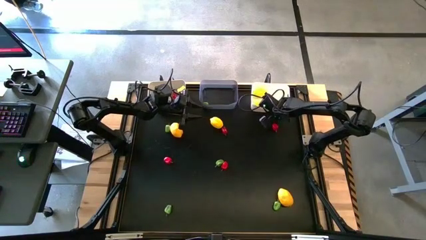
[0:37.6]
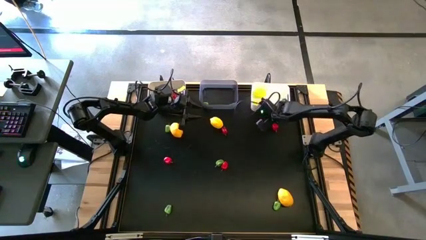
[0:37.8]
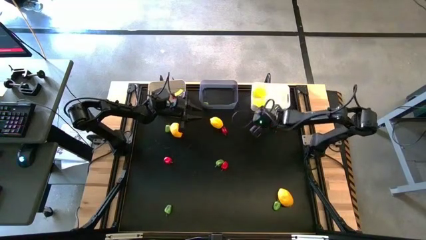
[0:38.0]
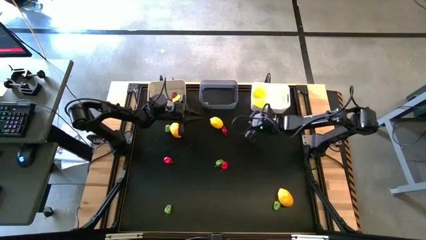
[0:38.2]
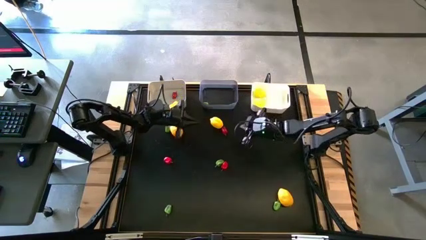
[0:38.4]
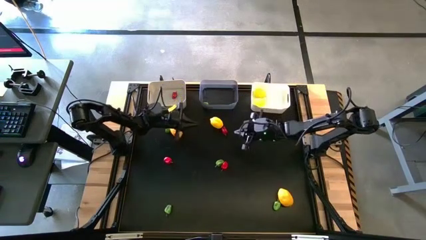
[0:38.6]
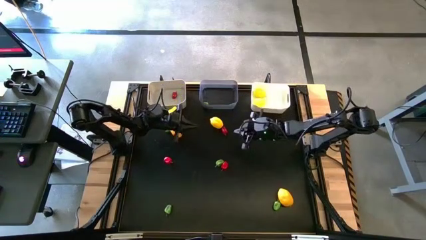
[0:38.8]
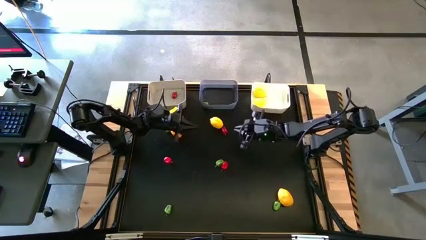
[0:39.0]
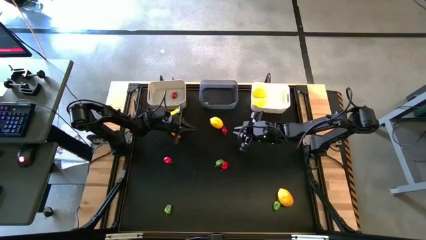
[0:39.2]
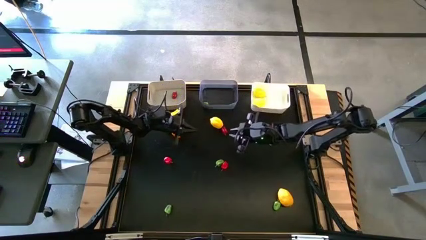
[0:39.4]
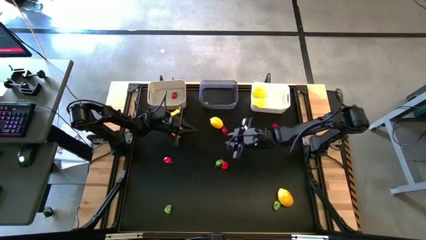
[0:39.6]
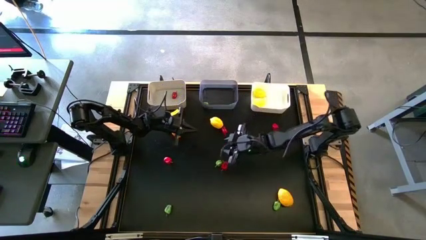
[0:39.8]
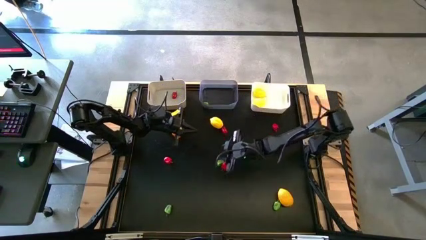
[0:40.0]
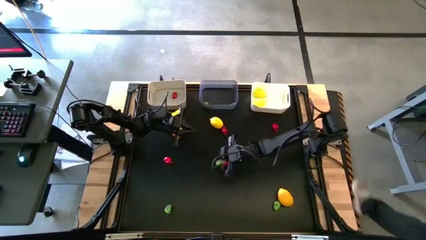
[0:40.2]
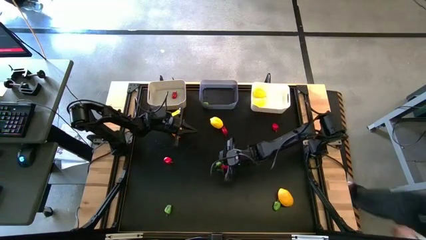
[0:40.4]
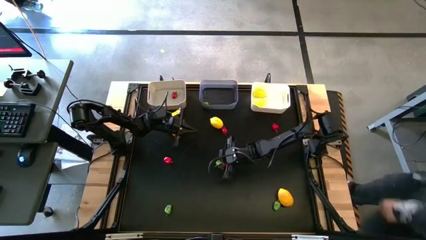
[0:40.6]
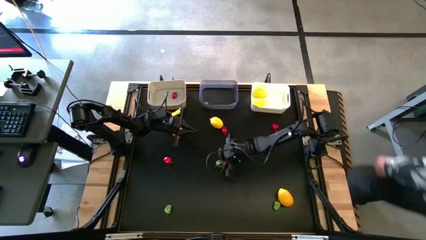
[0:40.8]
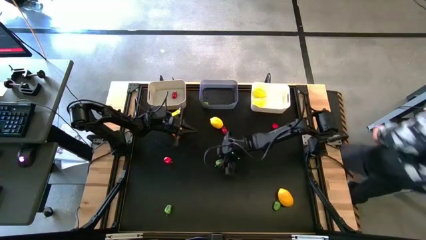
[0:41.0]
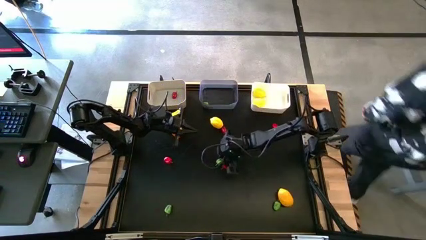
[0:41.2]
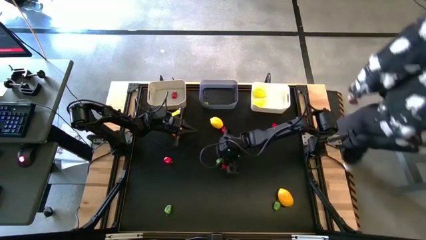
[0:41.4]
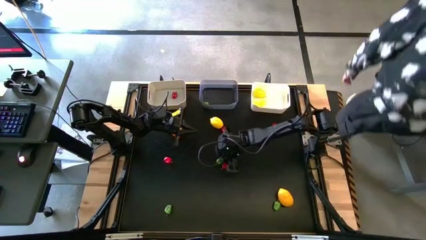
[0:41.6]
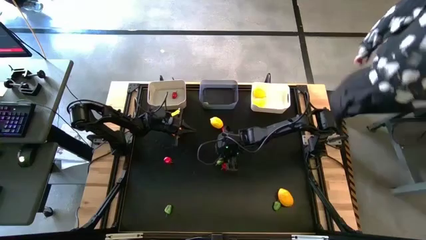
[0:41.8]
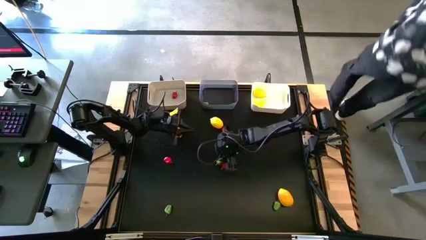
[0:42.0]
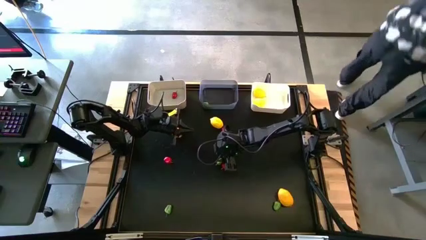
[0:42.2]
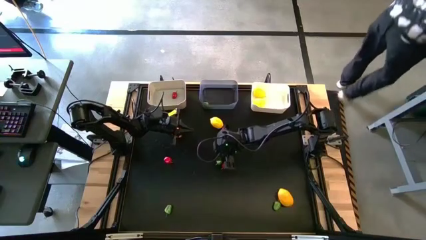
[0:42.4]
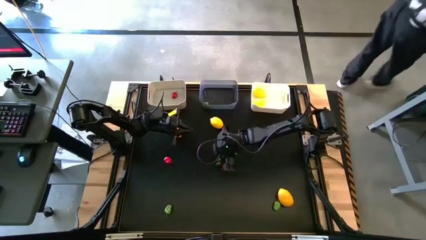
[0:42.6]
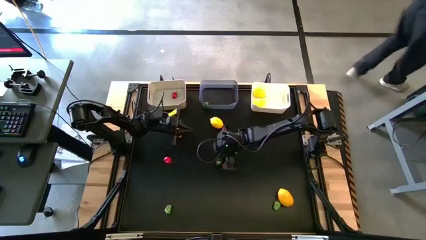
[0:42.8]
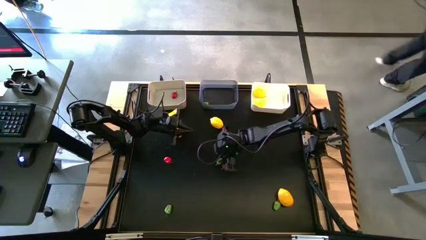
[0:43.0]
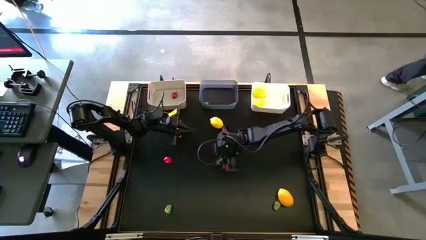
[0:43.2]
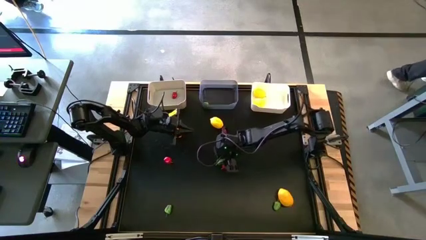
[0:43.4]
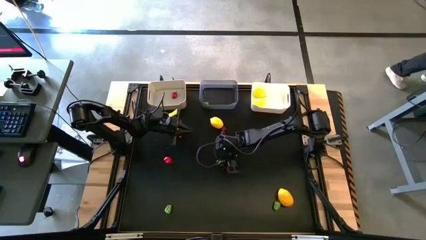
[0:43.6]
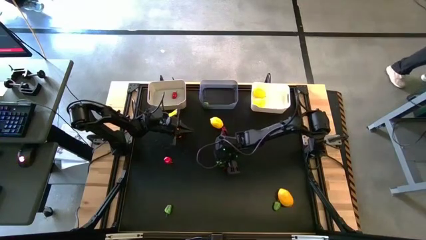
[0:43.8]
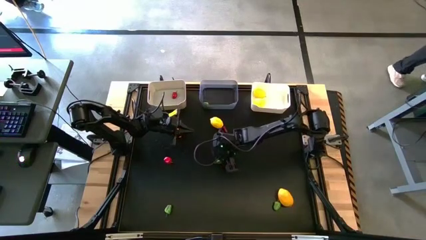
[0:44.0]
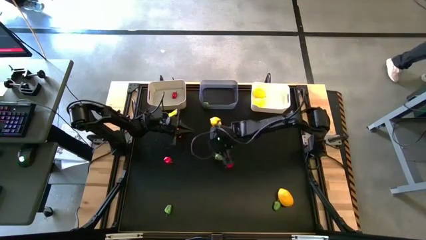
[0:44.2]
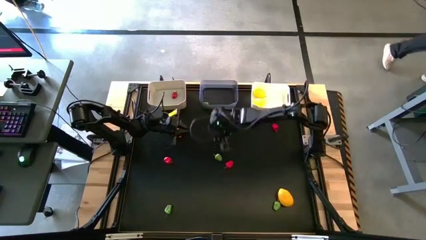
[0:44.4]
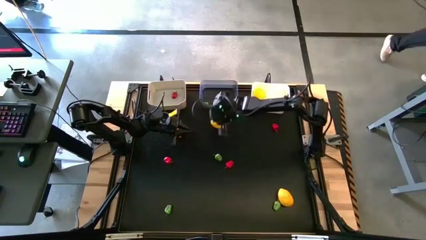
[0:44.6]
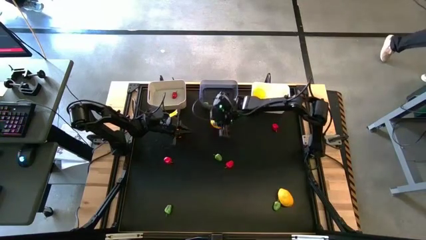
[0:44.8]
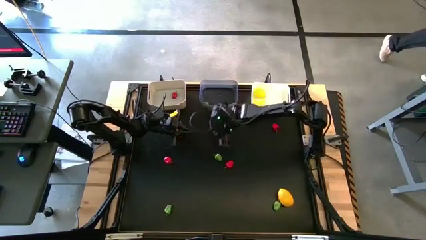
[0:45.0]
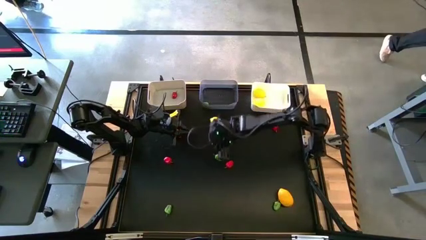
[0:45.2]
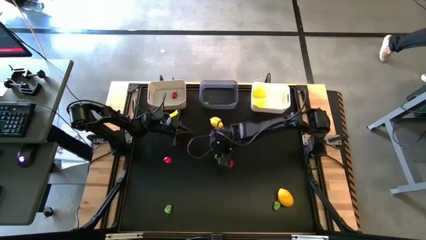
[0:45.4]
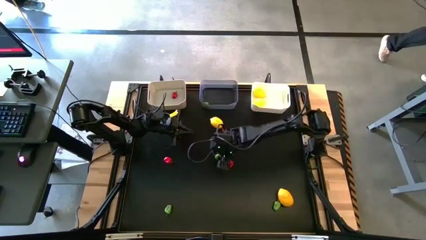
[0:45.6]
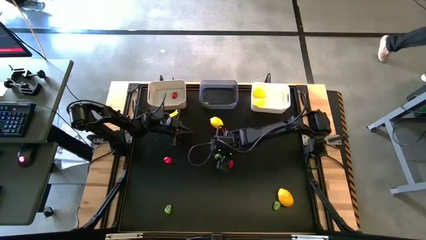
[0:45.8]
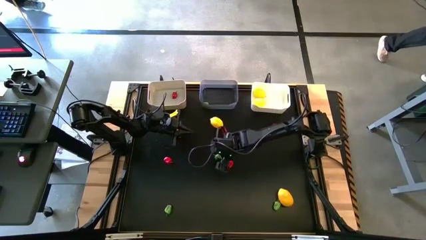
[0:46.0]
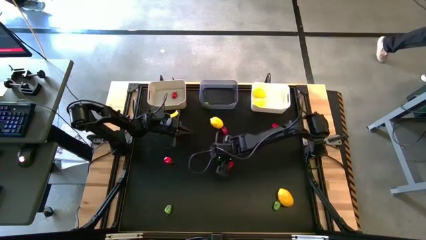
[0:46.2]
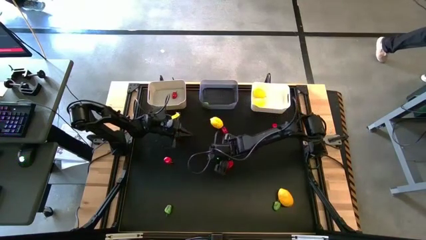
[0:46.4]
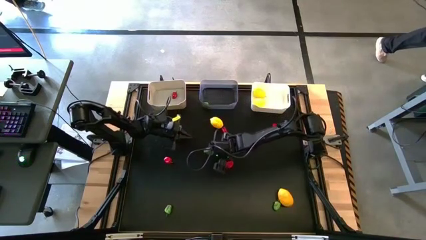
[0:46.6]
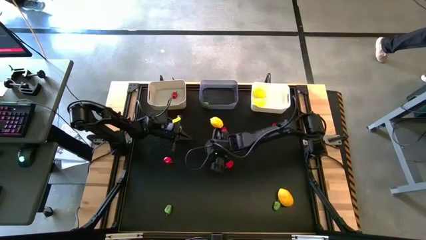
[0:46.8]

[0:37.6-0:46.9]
Task: Sort produce into baskets
Put the green bell pepper into the transparent bin

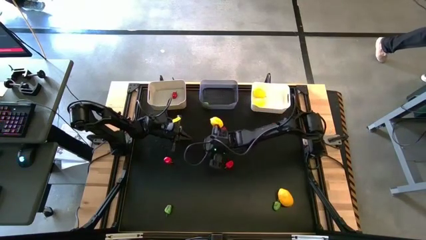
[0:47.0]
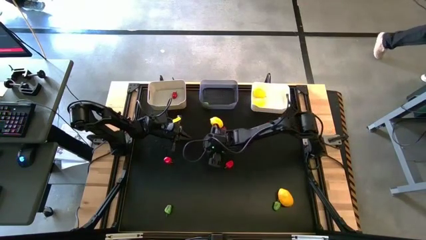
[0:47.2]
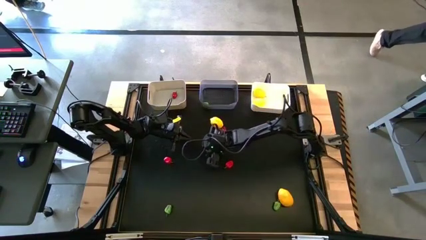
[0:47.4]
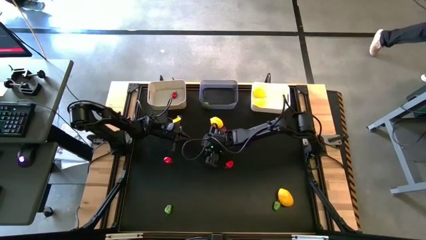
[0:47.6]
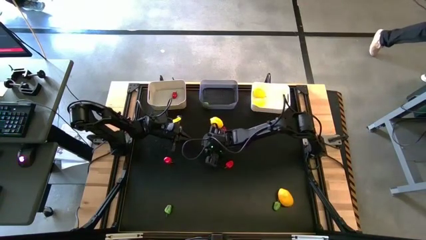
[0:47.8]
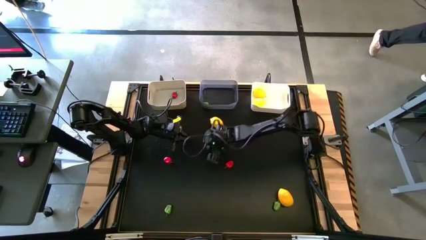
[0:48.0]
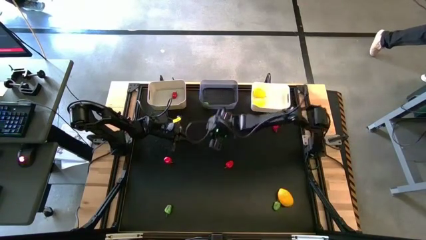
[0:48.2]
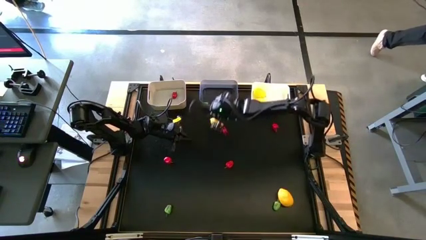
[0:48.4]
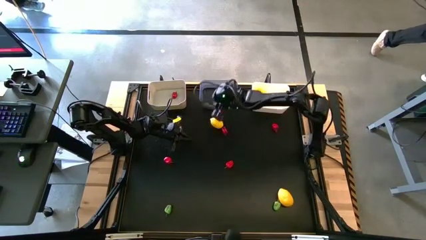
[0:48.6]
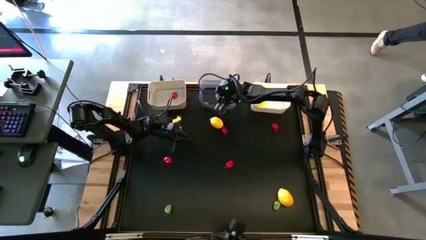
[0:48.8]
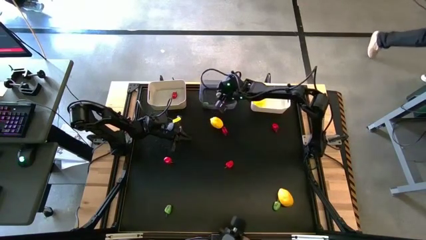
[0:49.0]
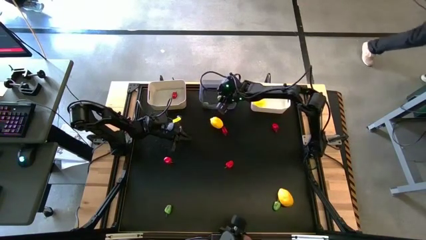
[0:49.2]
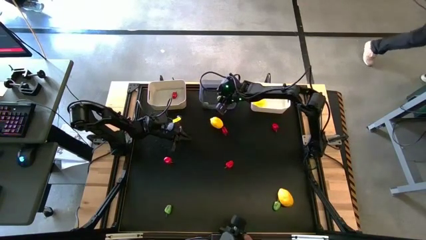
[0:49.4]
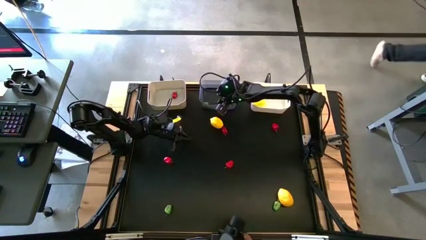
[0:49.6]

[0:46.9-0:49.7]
Put the green bell pepper into the transparent bin

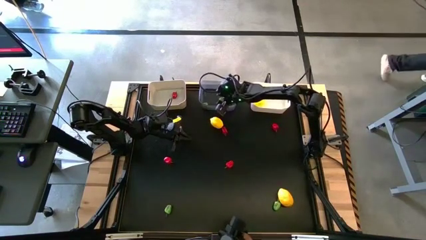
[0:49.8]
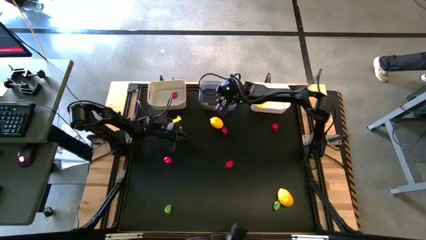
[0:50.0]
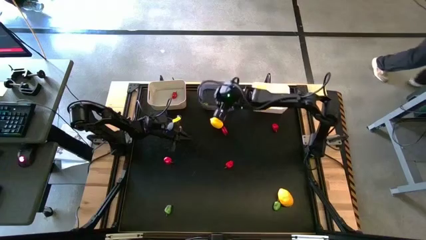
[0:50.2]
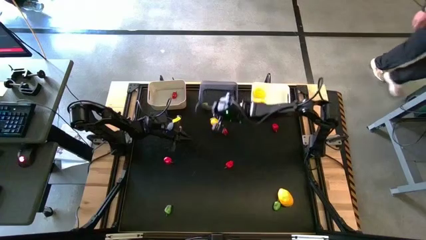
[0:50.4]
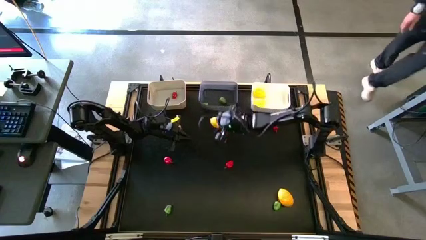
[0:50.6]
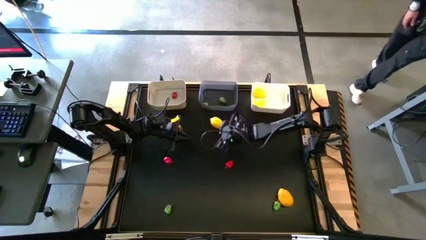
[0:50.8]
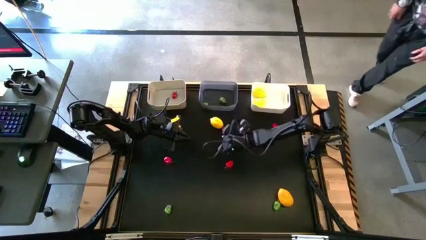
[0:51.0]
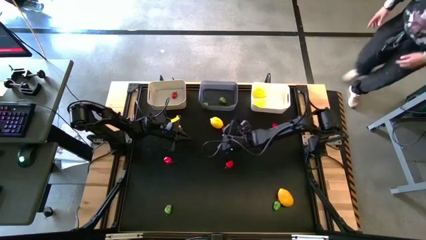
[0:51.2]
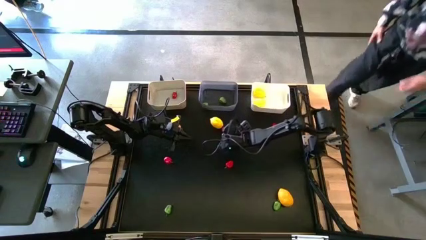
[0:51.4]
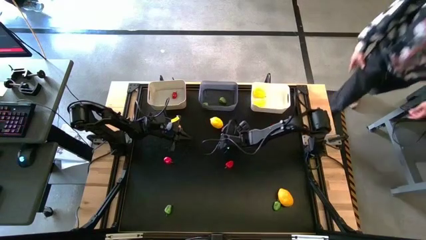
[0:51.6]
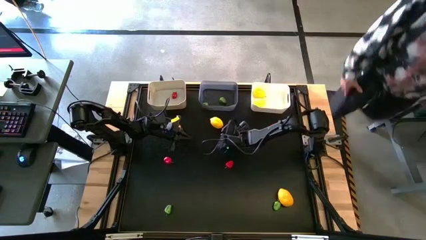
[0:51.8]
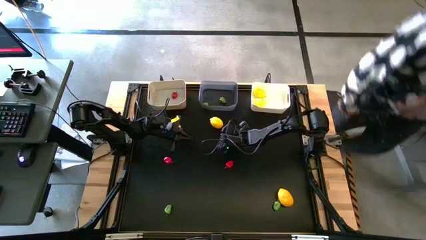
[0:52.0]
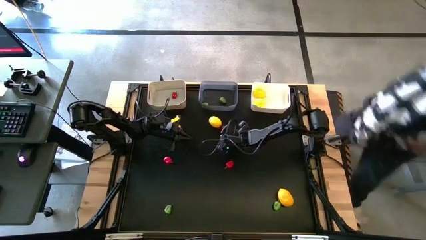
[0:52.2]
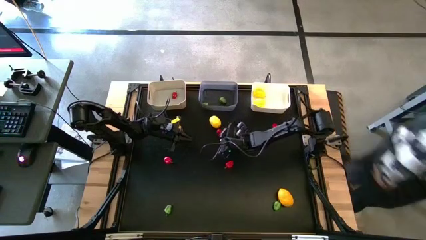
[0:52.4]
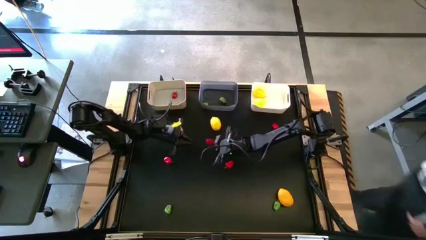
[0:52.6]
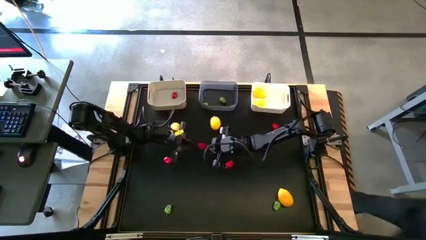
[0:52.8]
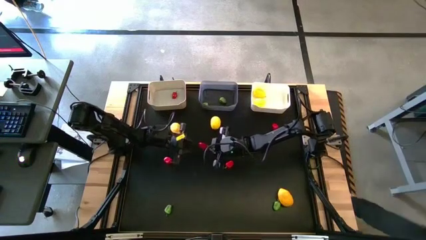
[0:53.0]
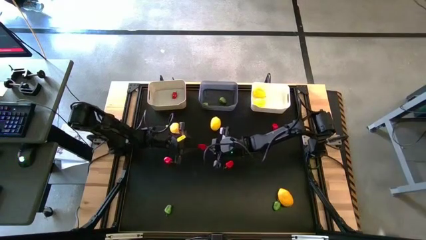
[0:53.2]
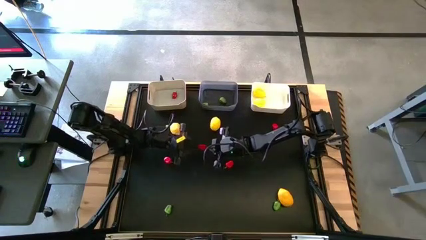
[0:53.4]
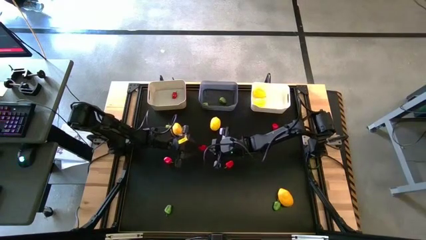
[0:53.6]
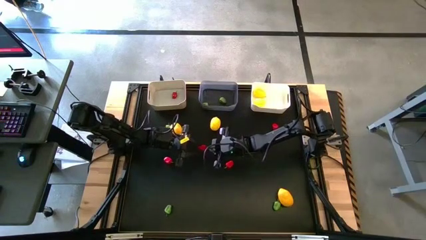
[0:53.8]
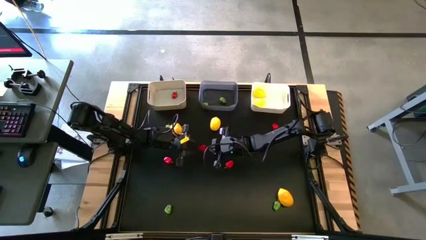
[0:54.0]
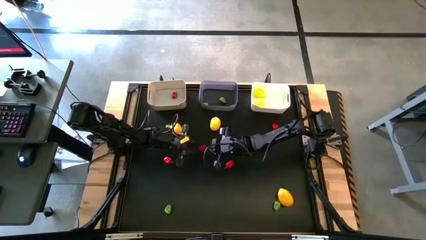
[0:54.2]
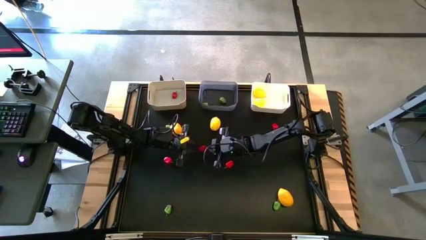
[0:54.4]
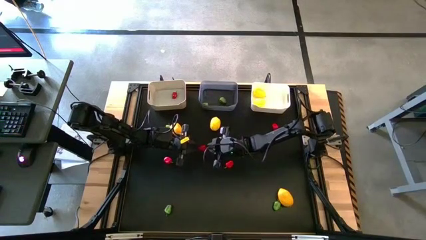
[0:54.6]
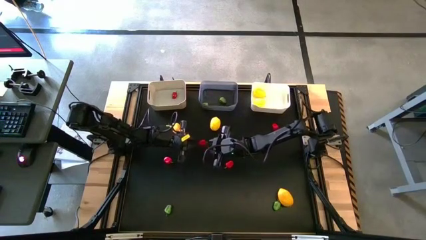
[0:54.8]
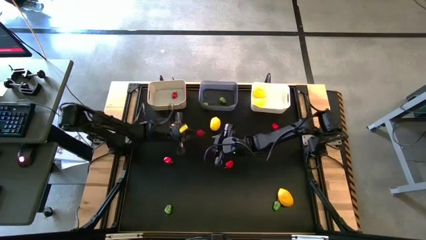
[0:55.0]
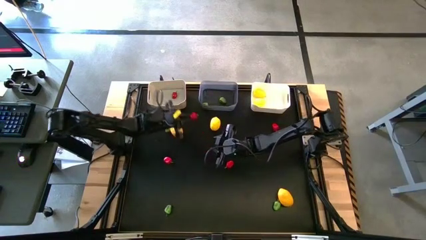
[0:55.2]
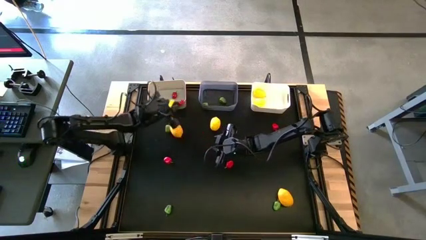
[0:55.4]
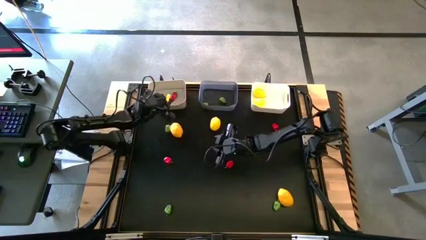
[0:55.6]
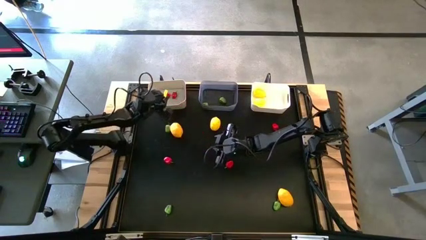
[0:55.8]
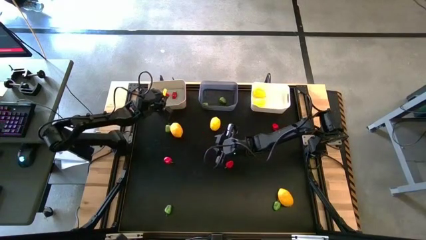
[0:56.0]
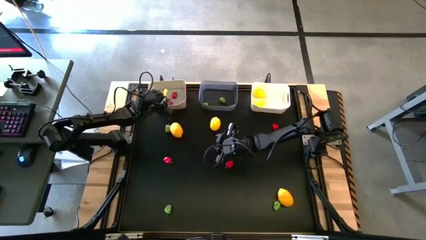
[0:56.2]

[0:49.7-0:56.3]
Put the red bell pepper into the gray bin
